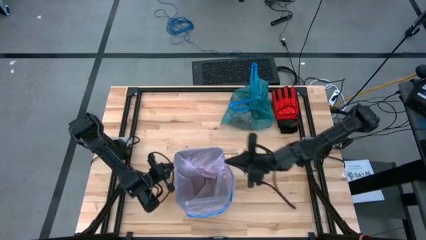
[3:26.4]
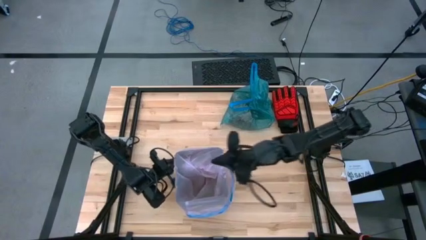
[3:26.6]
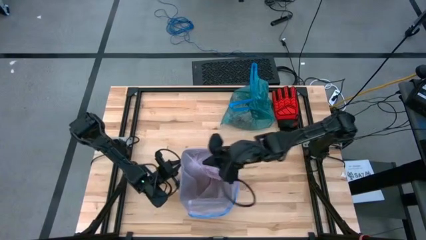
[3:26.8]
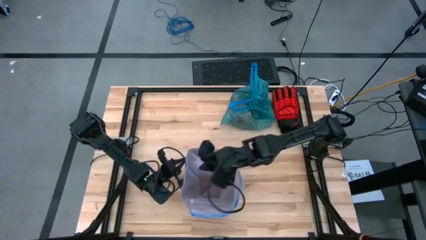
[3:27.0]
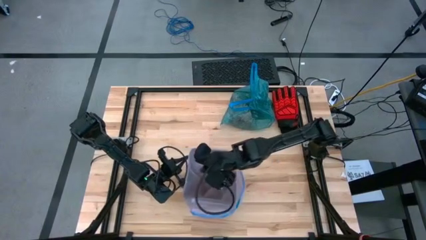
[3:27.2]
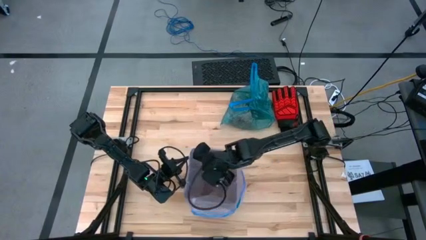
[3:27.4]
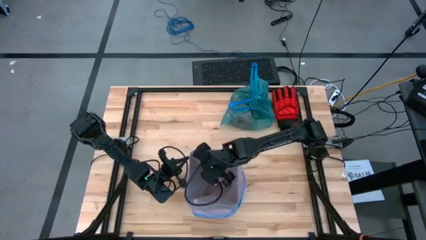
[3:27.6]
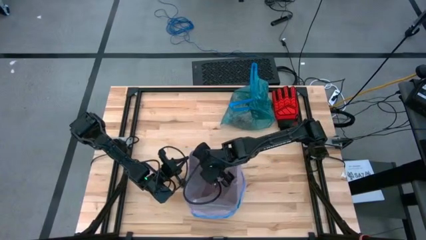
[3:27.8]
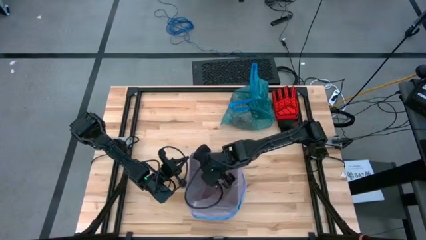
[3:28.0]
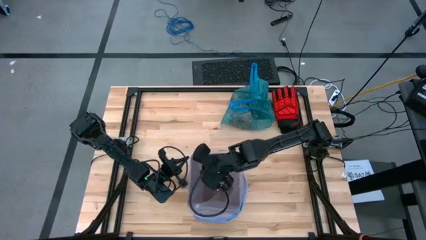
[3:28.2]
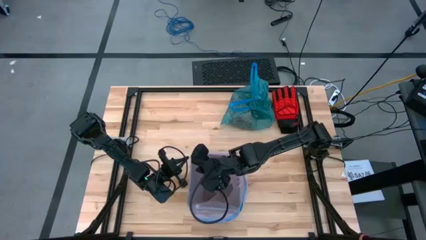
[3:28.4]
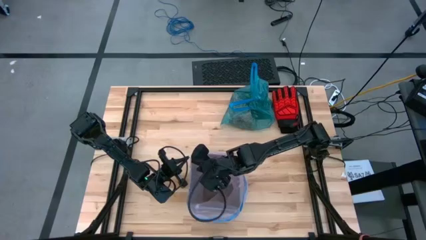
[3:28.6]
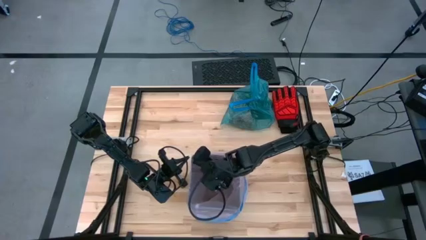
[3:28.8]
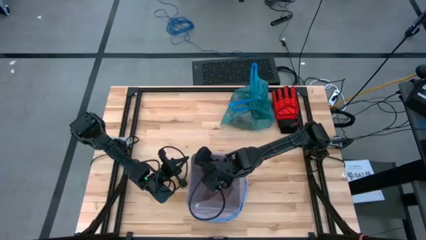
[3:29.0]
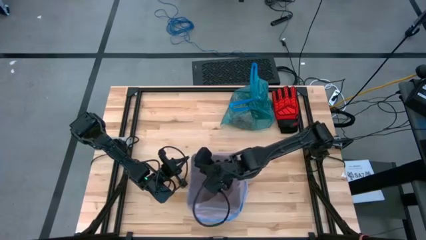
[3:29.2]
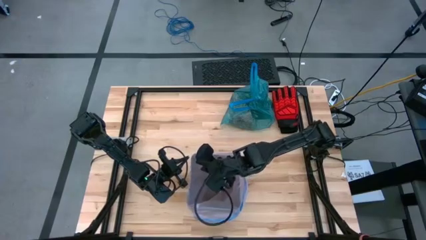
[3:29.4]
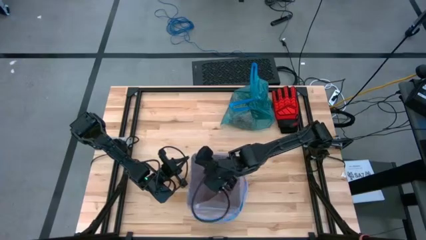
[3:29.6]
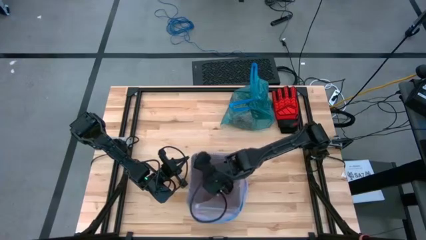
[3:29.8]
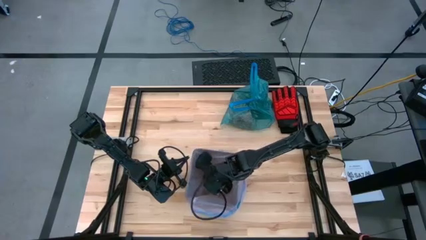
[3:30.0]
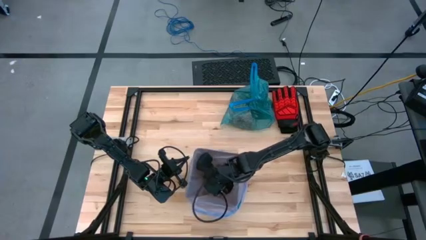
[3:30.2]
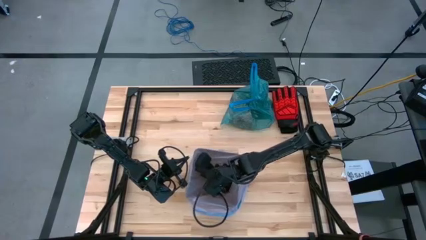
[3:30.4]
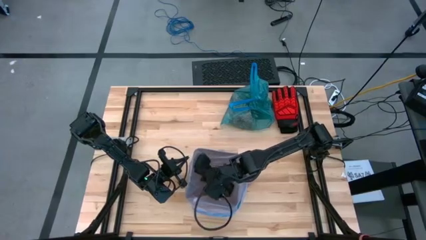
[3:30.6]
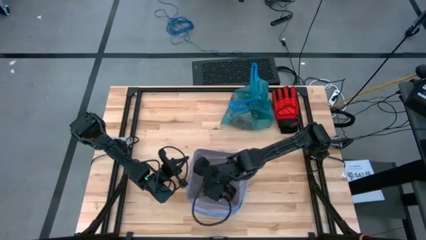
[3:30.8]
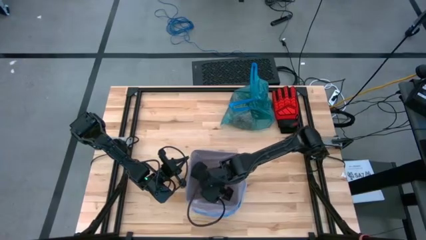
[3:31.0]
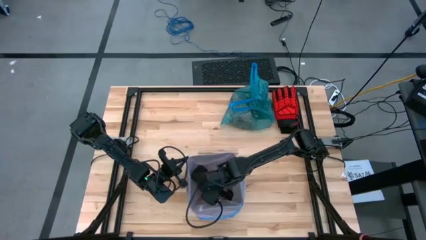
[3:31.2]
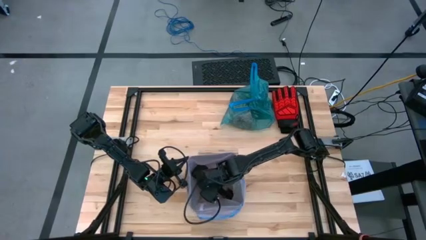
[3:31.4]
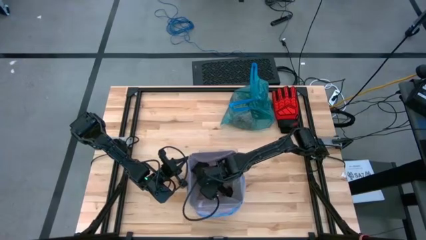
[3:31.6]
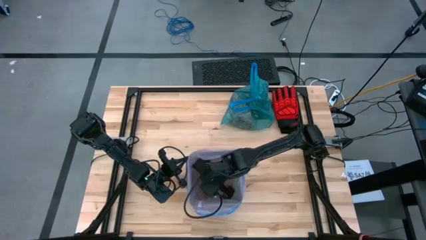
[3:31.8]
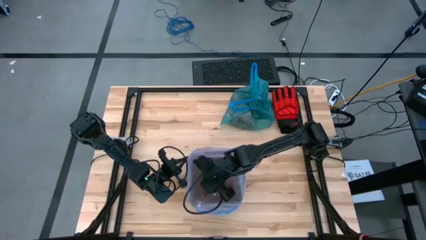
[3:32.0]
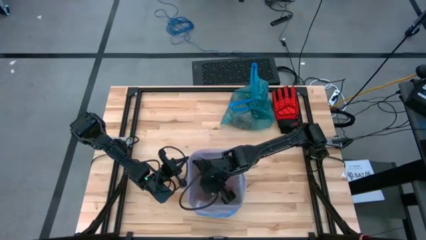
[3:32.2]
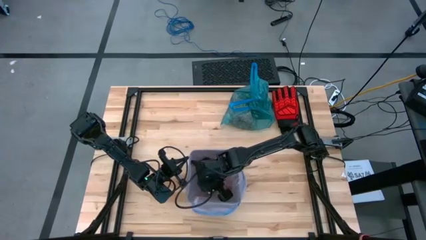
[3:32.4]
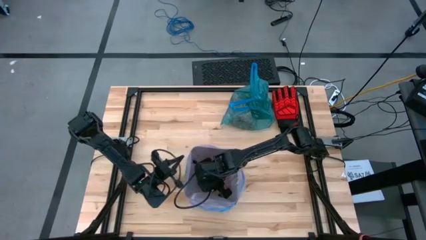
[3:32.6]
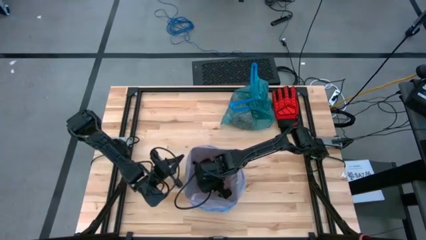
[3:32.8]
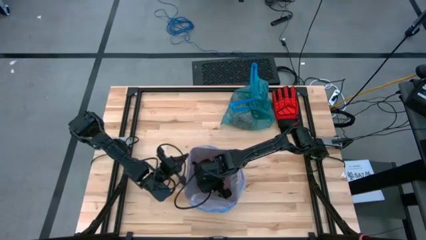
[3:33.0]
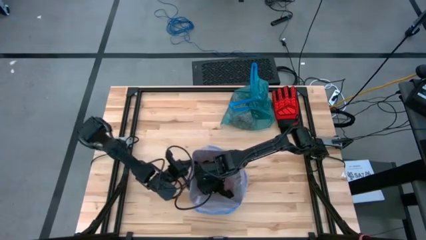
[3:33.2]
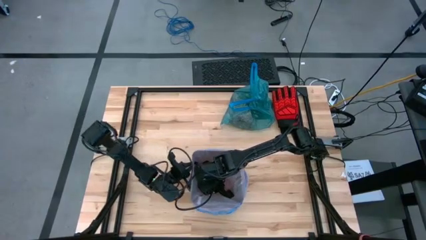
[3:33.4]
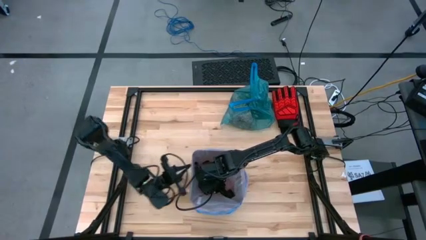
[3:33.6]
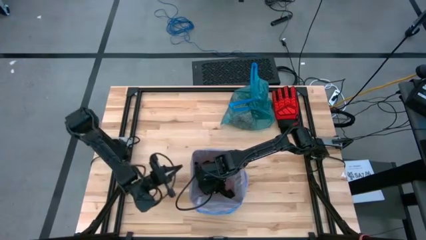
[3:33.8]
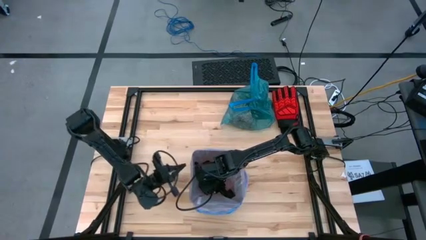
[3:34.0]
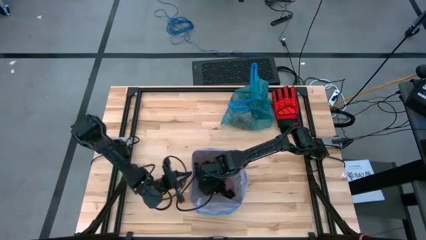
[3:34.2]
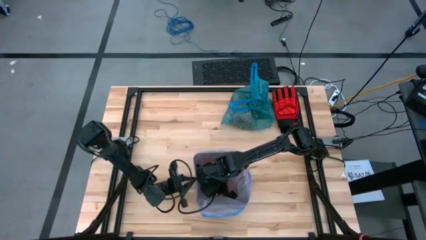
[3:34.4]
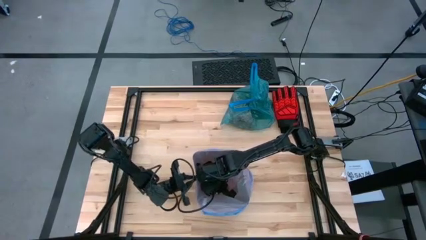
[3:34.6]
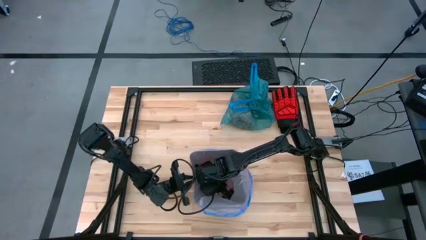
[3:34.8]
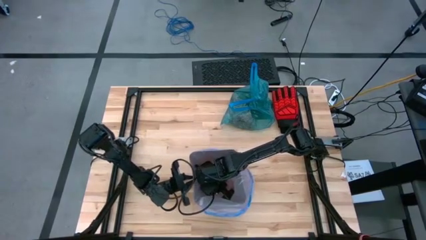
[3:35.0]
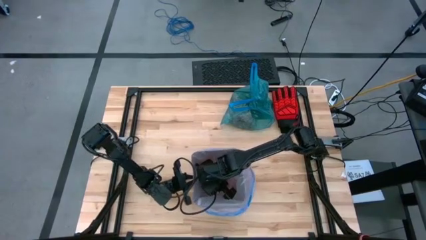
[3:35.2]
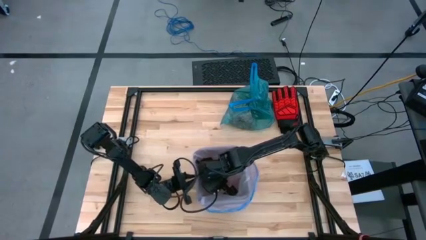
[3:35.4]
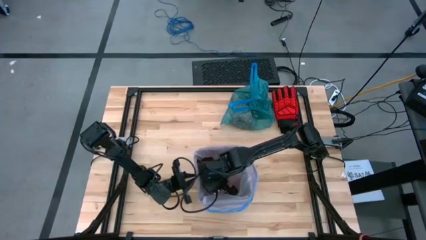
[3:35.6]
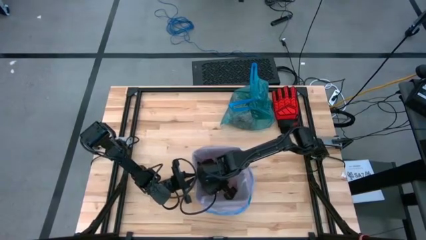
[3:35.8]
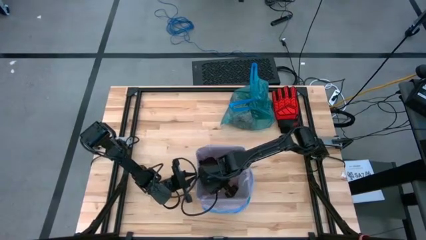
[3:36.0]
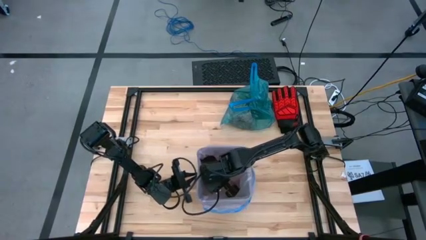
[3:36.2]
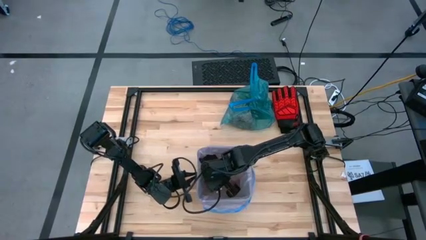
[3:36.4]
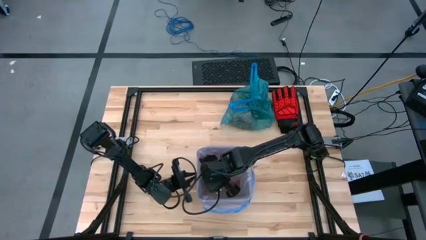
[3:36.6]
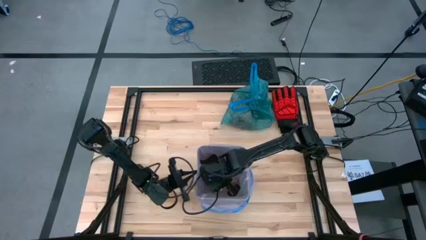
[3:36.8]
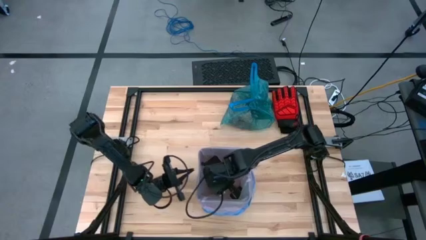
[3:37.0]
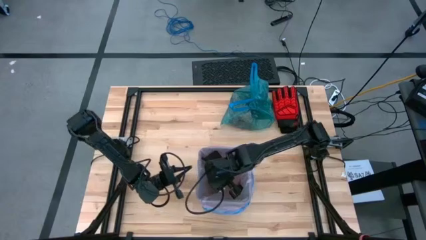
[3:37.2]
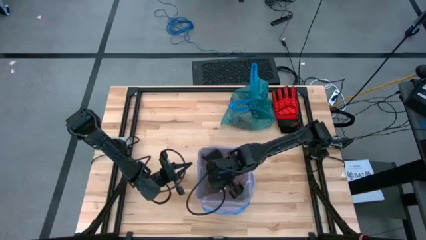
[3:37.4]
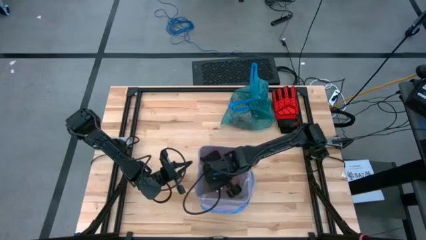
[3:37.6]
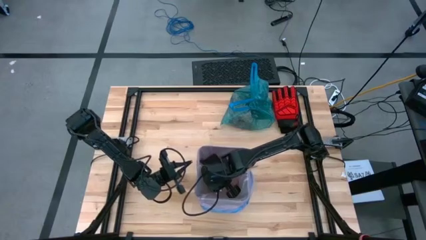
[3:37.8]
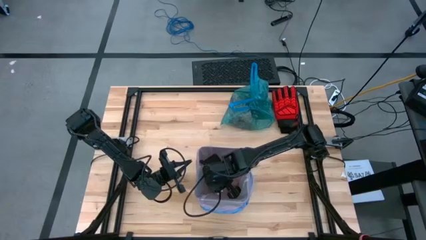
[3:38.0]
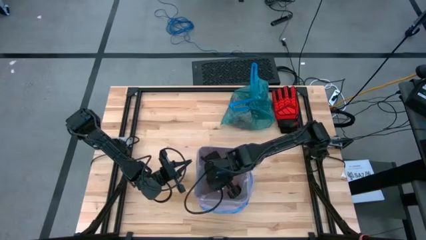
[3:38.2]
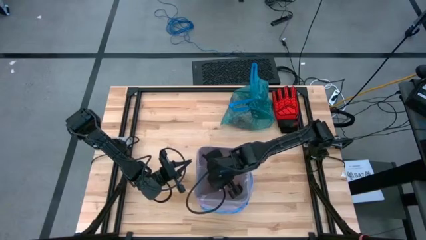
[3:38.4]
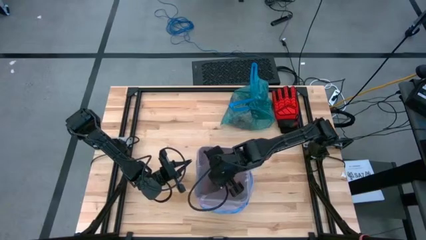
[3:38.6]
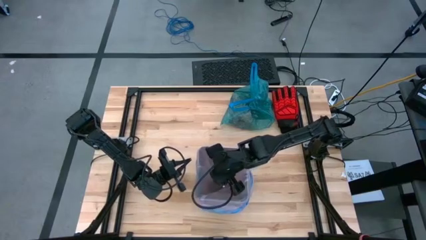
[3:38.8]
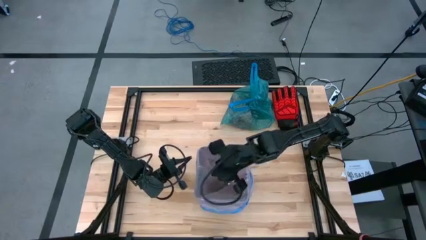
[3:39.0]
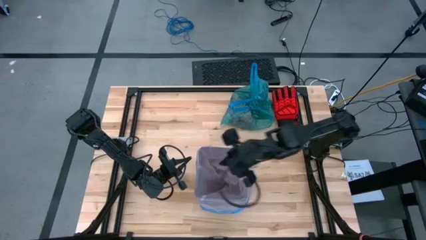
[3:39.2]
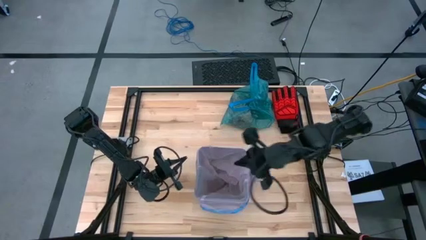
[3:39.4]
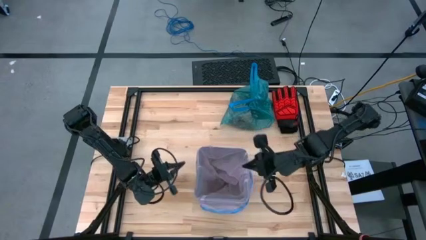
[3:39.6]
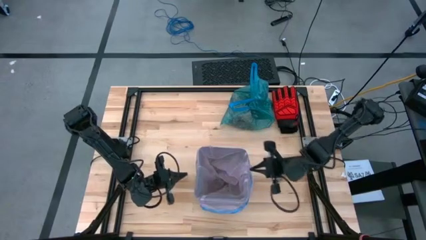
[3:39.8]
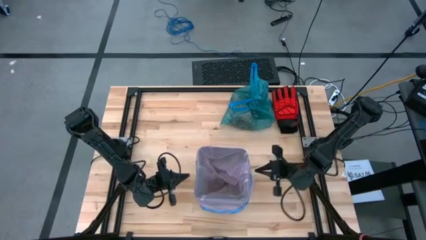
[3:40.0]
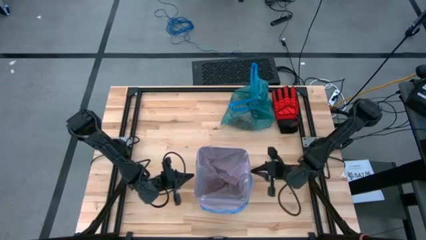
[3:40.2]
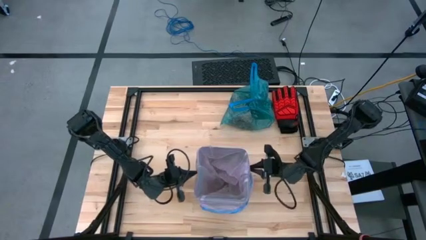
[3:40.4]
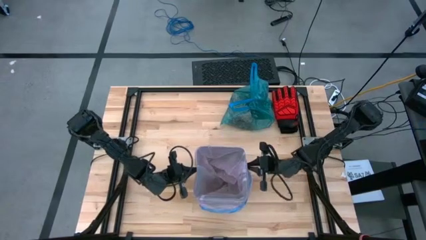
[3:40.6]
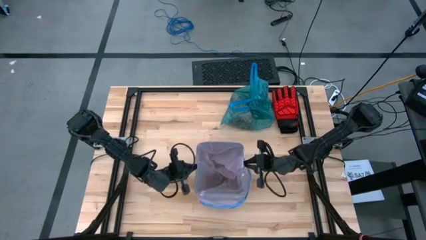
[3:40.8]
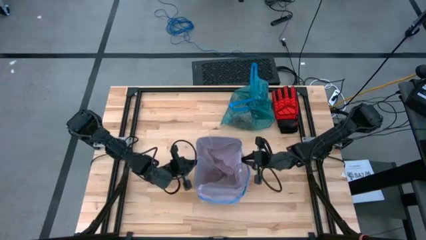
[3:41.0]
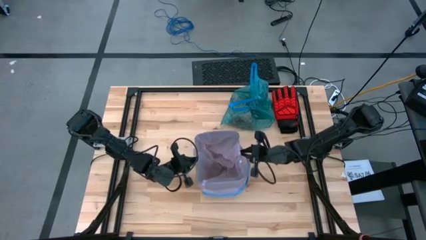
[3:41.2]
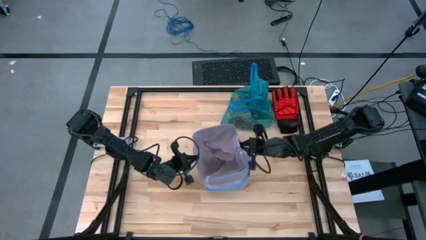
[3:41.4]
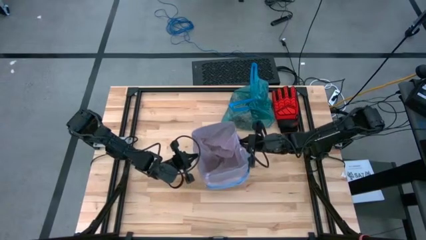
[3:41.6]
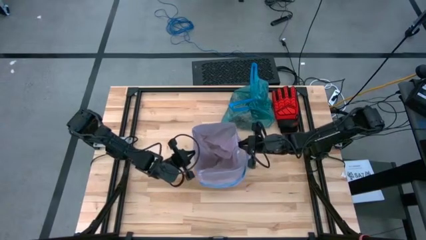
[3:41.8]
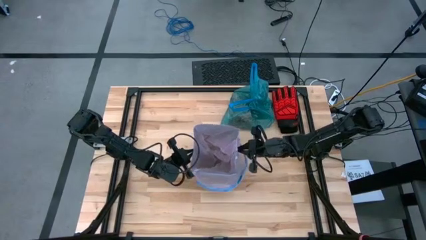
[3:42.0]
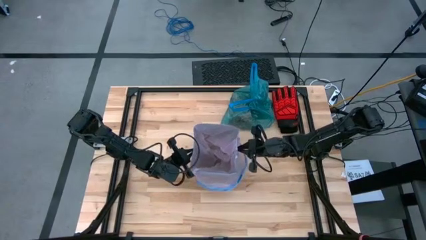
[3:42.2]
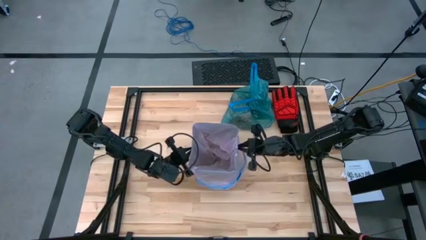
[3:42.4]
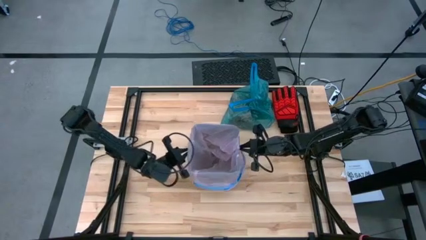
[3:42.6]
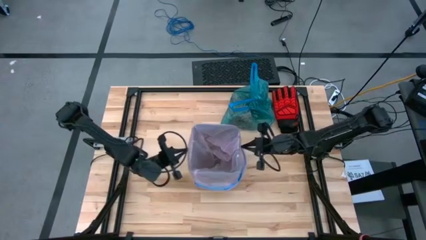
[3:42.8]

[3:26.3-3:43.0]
Task: place trash/remove bag and relplace
Insert the pink trash bag into the black trash bin
